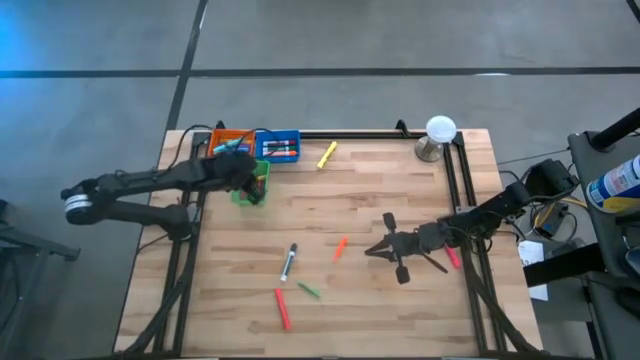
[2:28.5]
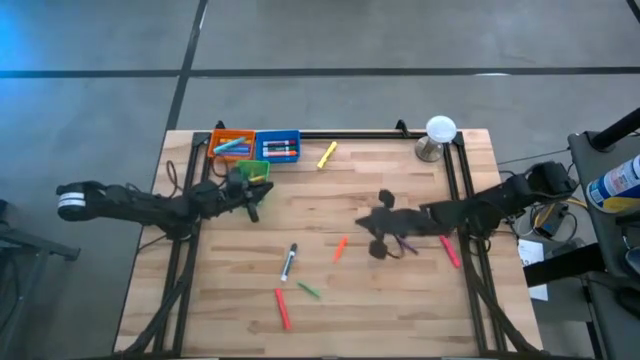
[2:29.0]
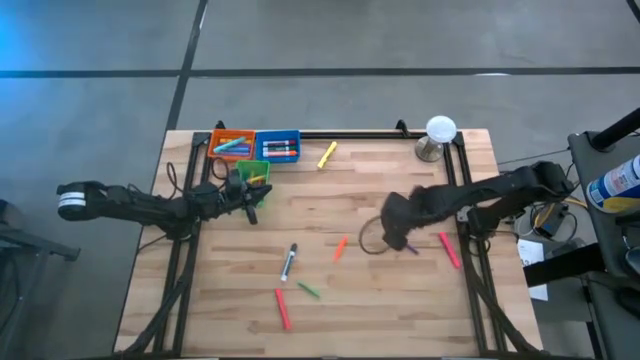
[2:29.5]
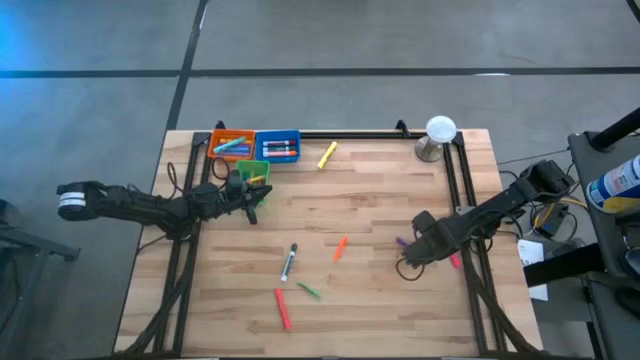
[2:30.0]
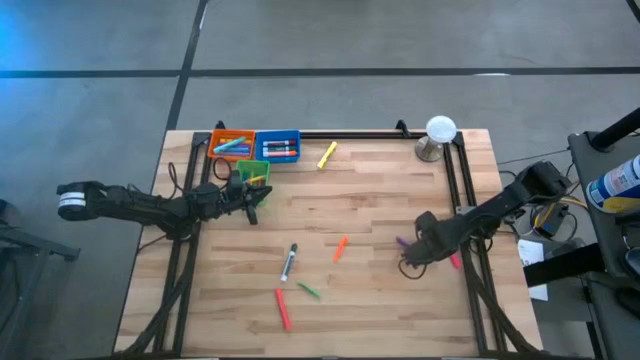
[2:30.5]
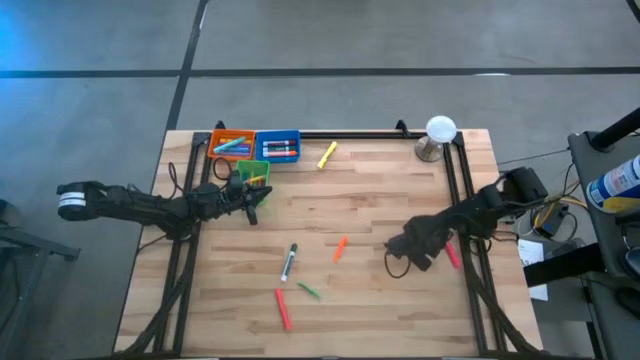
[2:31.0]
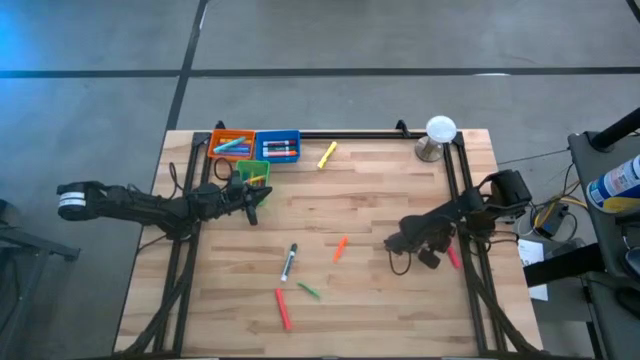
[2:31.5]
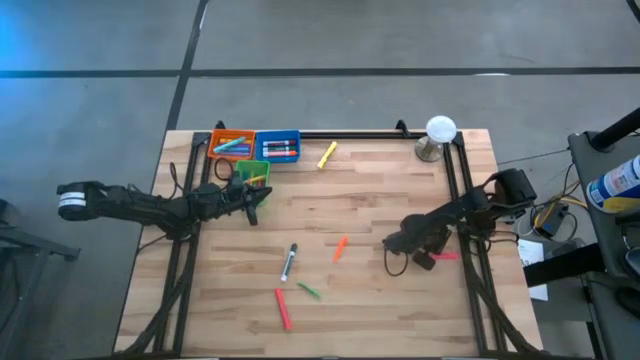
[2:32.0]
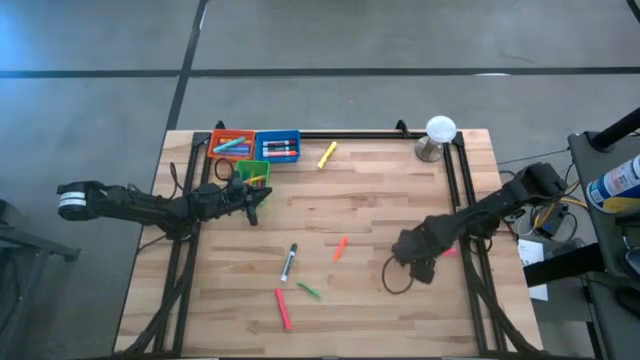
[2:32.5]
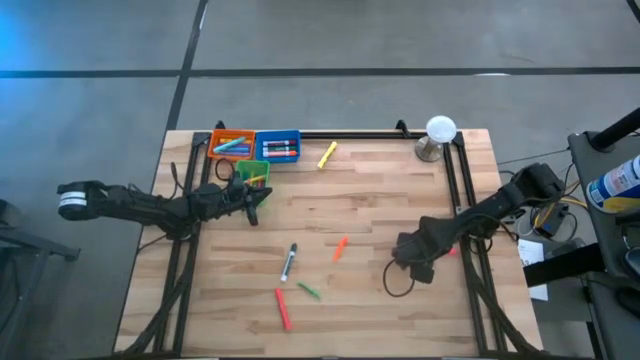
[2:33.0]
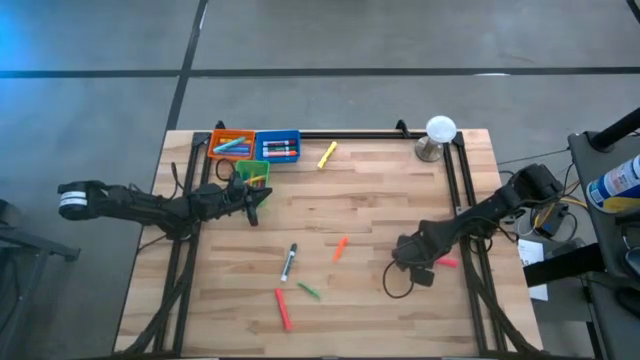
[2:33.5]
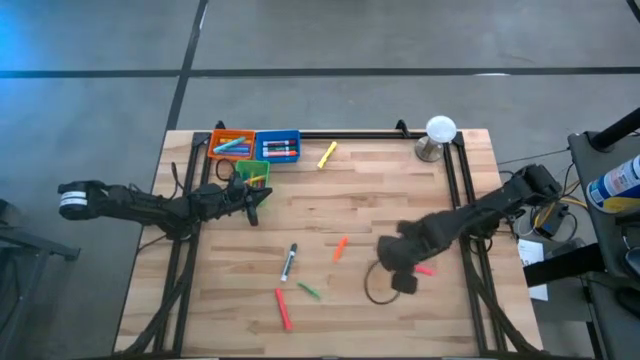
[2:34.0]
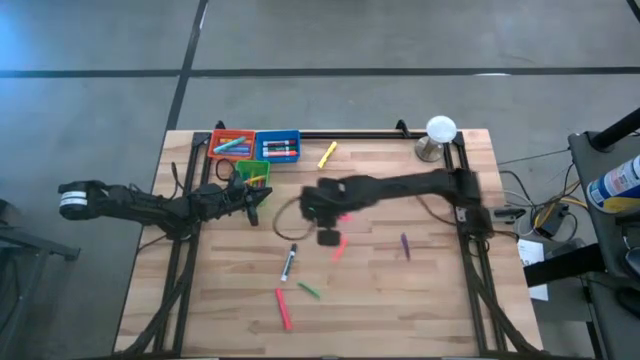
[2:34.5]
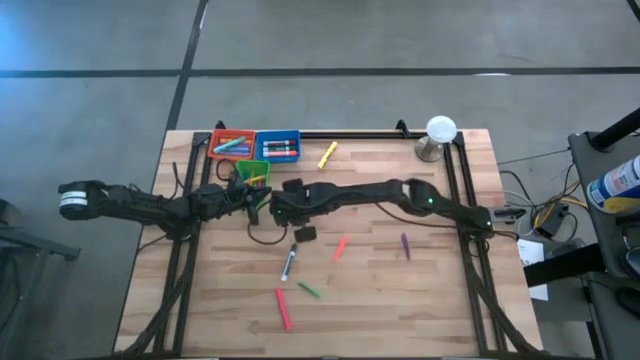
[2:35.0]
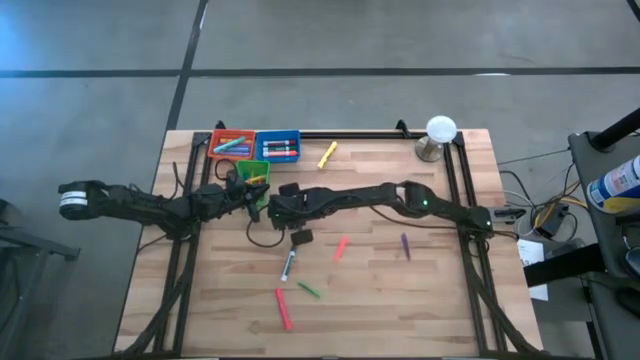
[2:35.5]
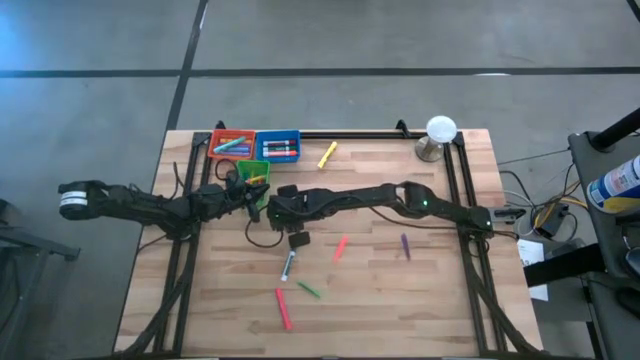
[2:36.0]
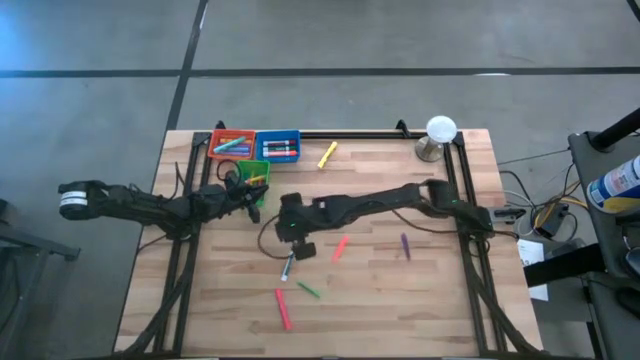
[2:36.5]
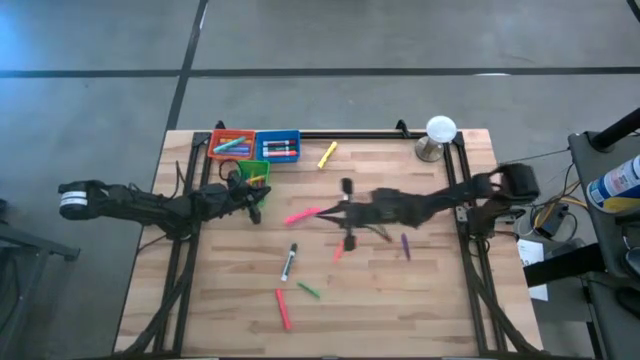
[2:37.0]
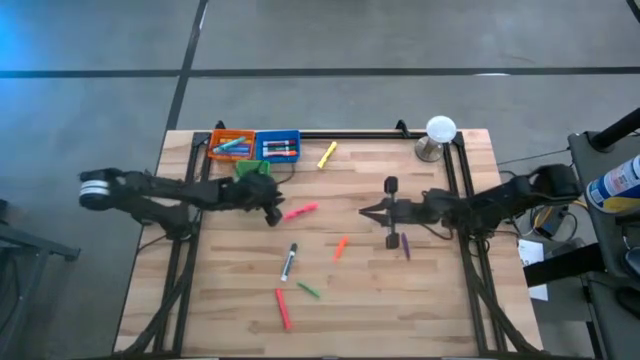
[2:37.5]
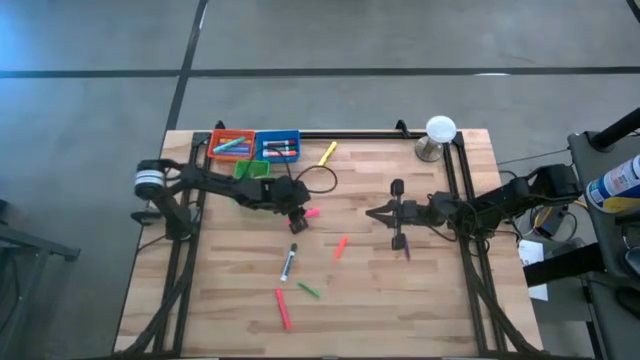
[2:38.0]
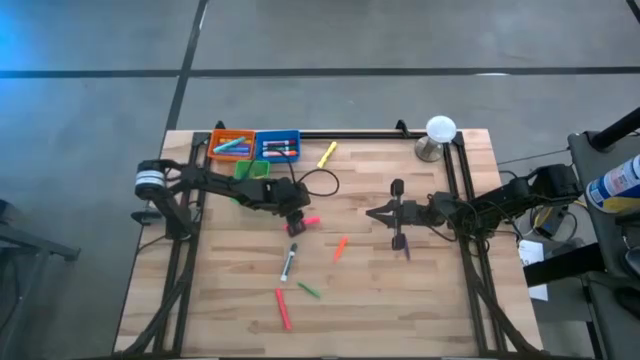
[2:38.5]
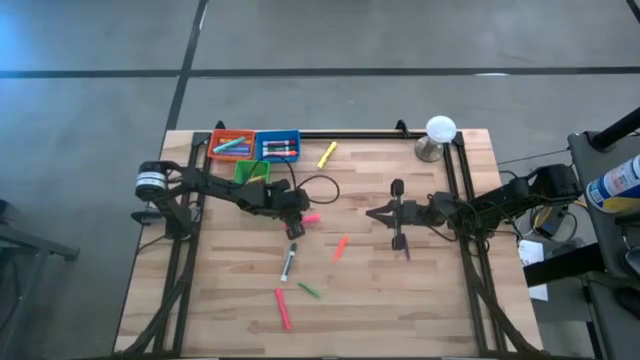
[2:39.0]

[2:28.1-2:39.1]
Task: Pick & Place Markers
Put the pink highlighter into the orange bin

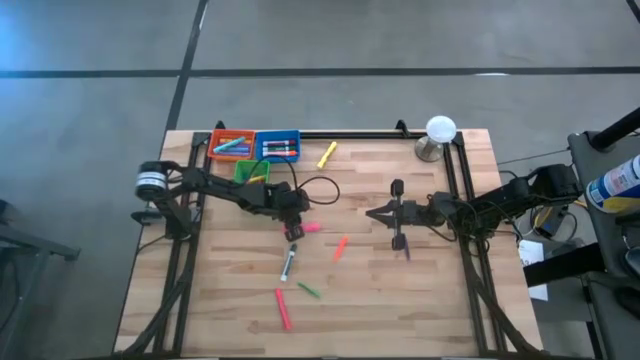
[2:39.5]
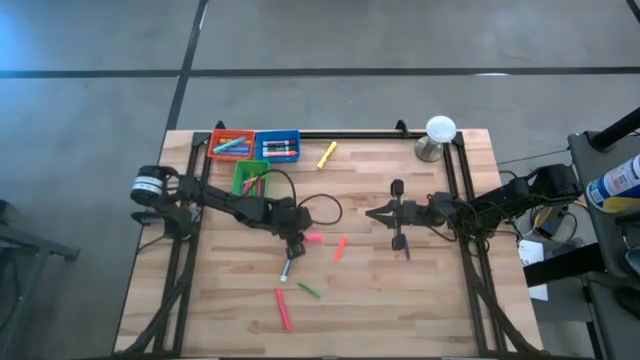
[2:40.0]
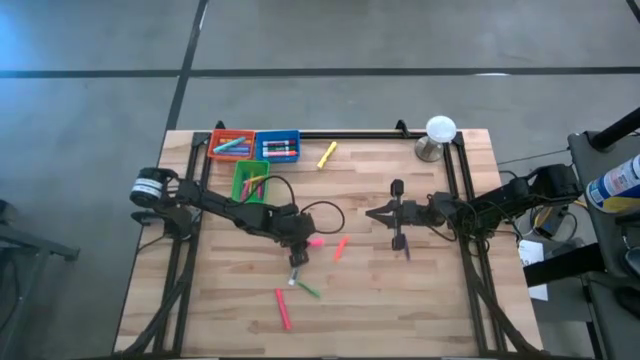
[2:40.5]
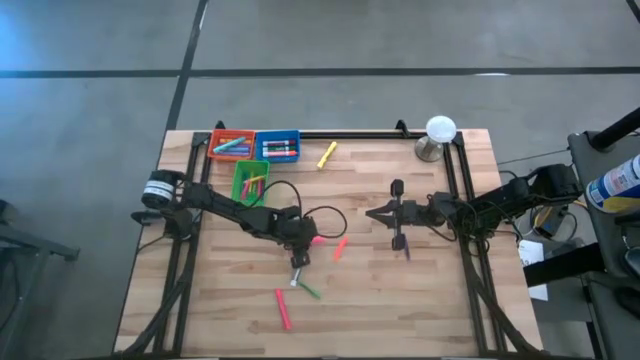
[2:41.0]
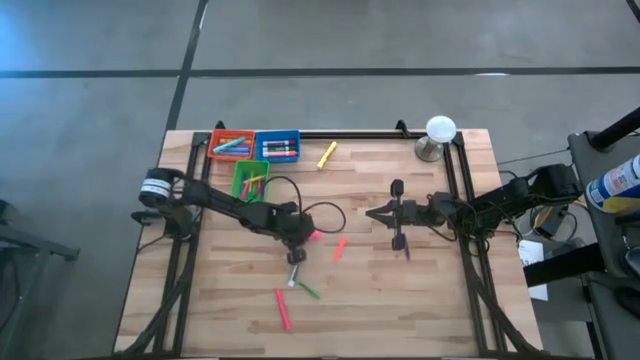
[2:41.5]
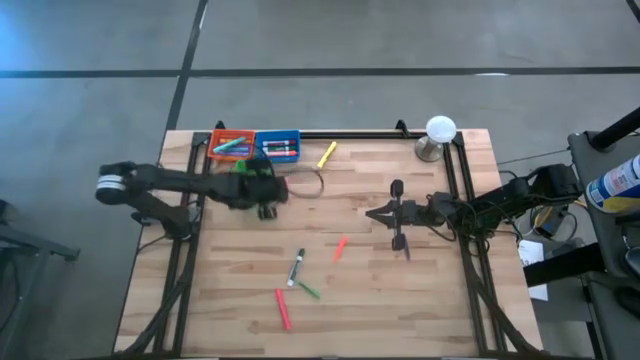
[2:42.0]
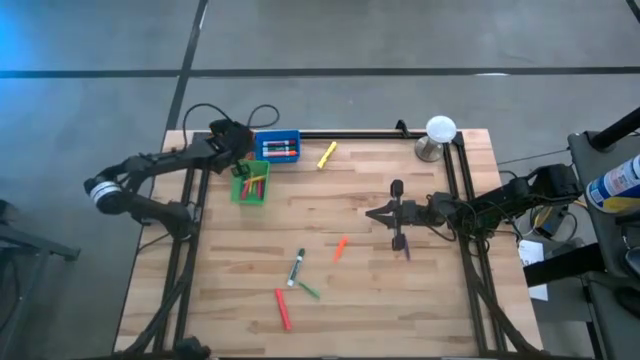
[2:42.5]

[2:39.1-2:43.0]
Put the pink highlighter into the orange bin

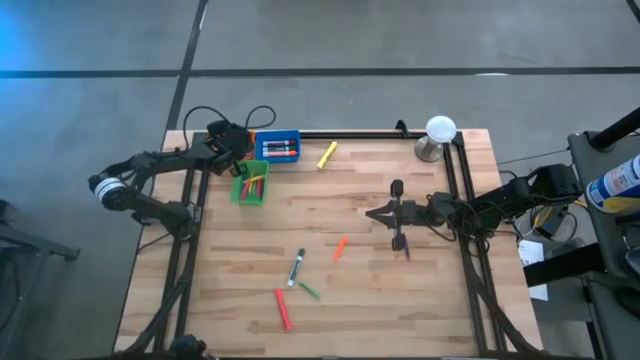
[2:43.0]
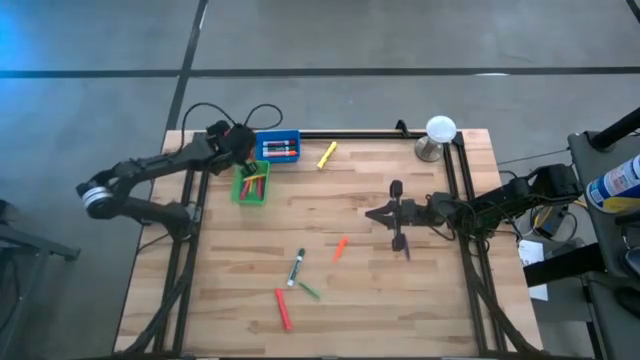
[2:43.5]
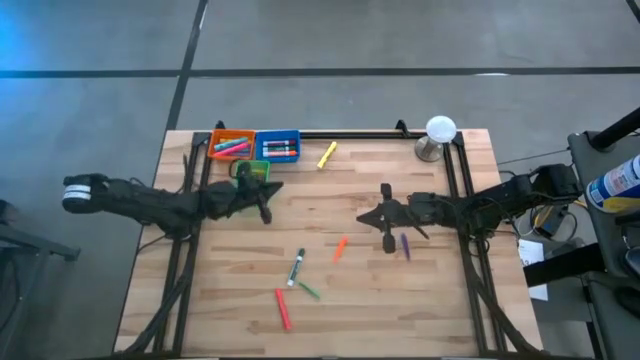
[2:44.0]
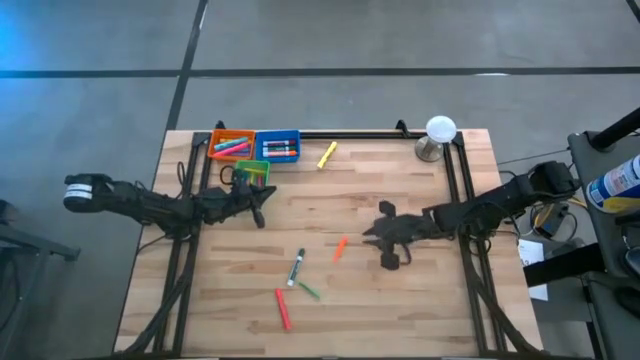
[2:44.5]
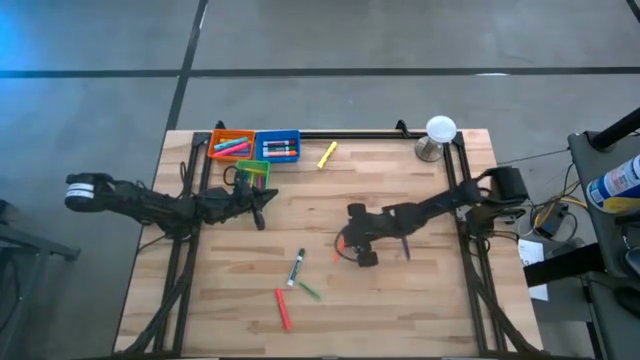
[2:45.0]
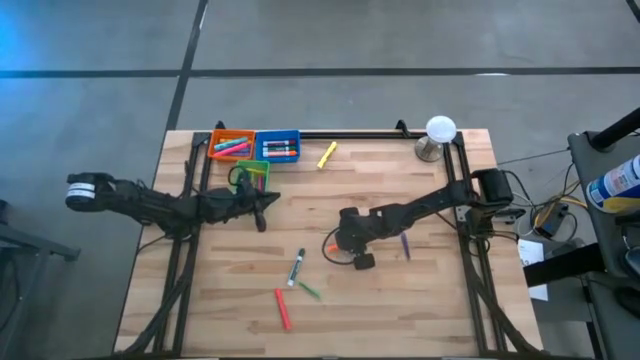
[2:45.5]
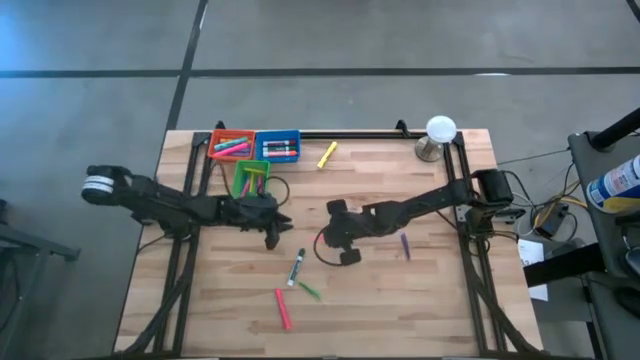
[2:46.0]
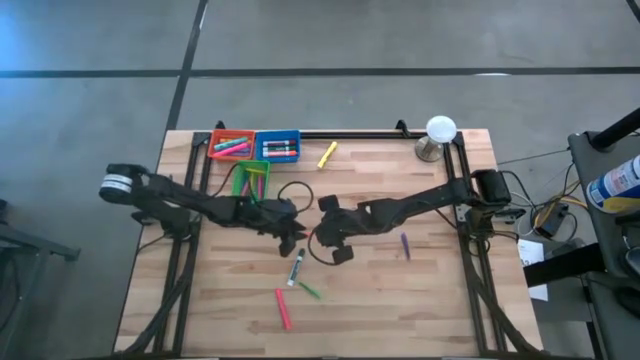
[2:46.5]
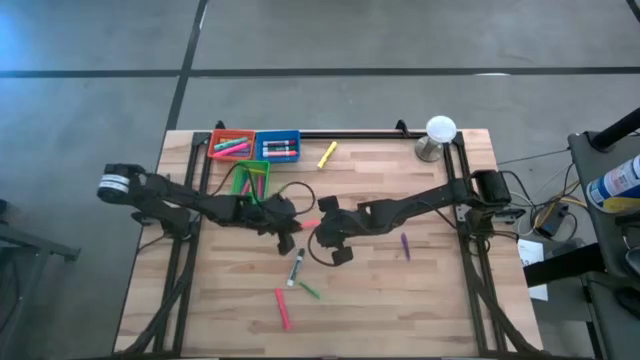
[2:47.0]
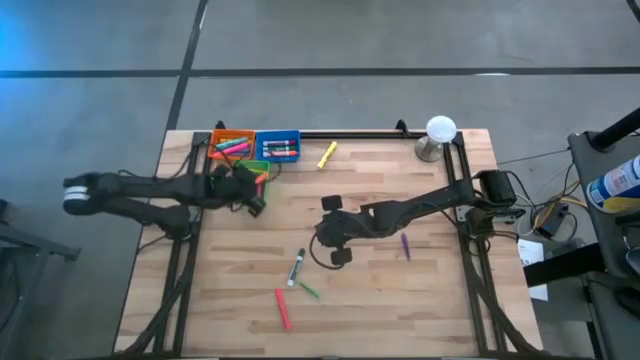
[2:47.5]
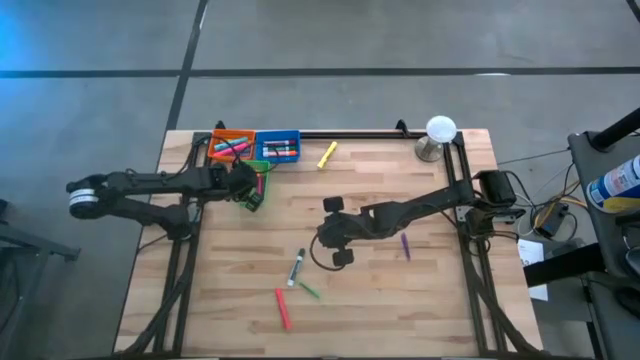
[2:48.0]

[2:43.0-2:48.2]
Put the orange pen into the green bin

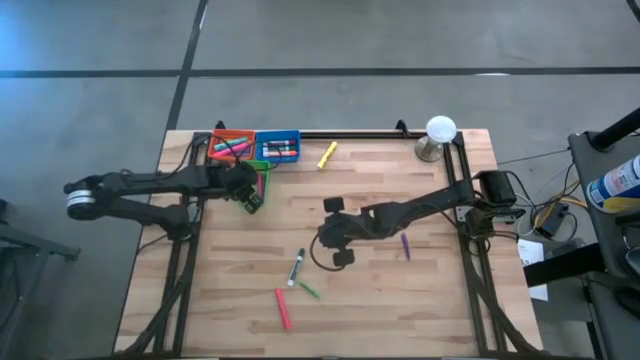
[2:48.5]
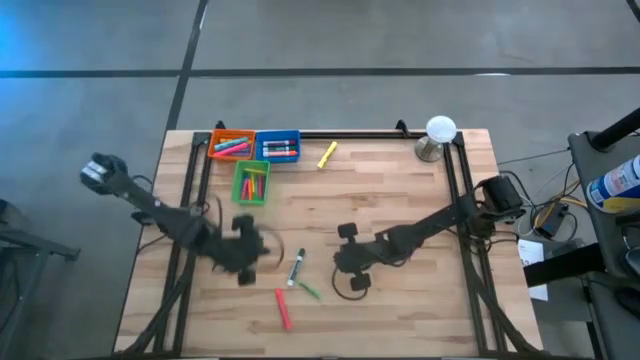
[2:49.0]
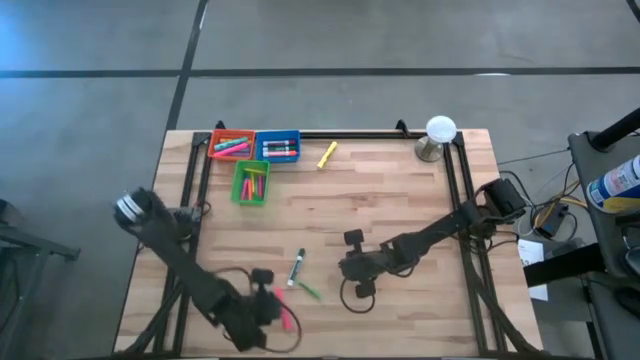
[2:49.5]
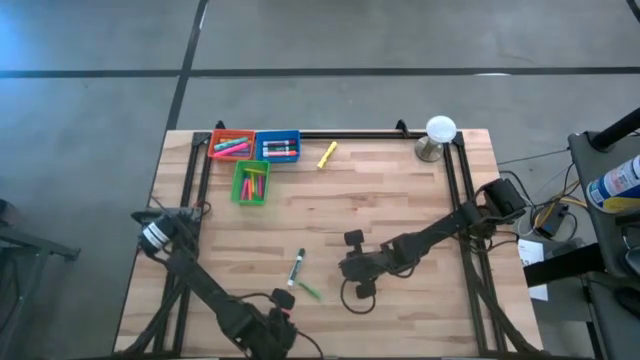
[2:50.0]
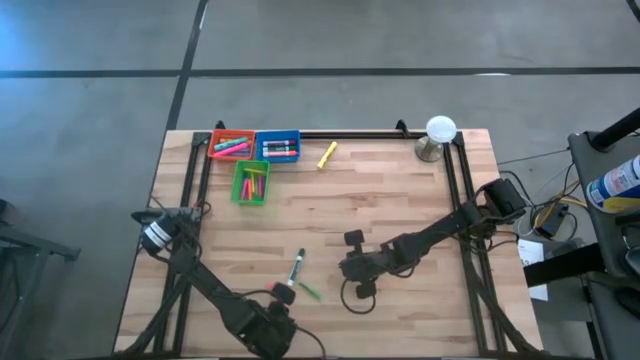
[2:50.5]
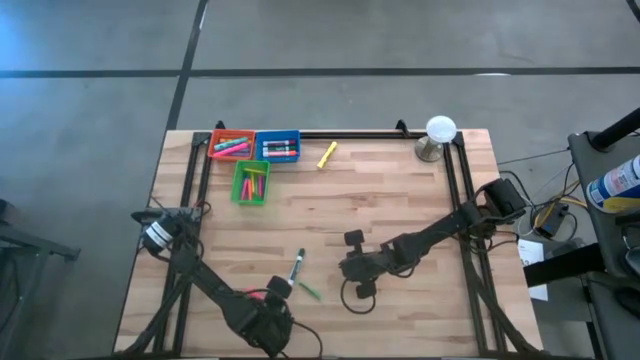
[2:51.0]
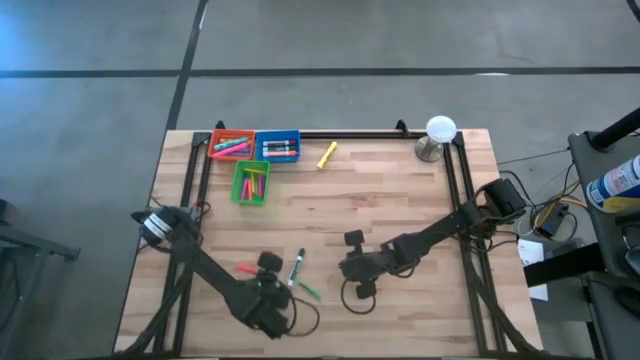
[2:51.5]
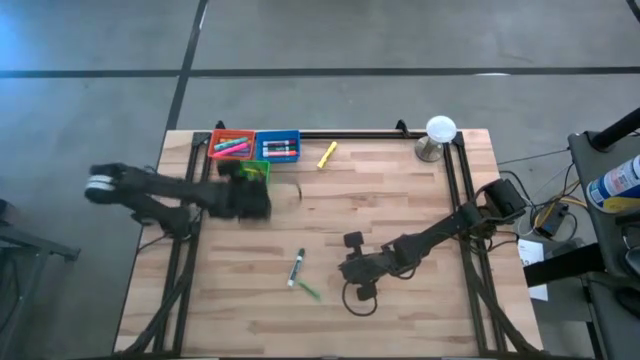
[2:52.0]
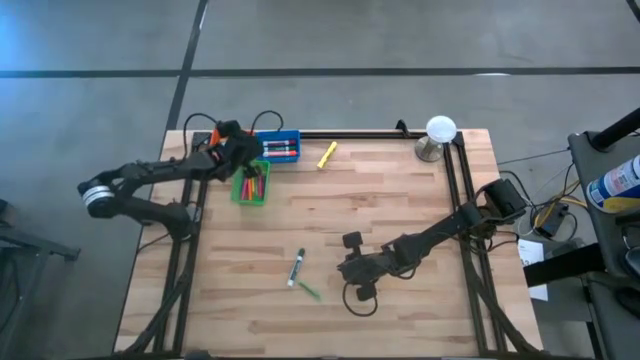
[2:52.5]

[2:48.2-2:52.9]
Put the pink highlighter into the orange bin
